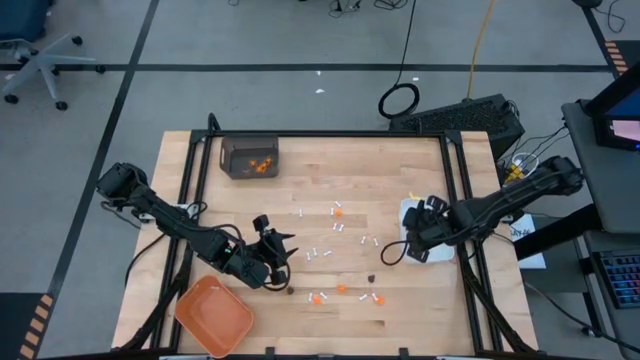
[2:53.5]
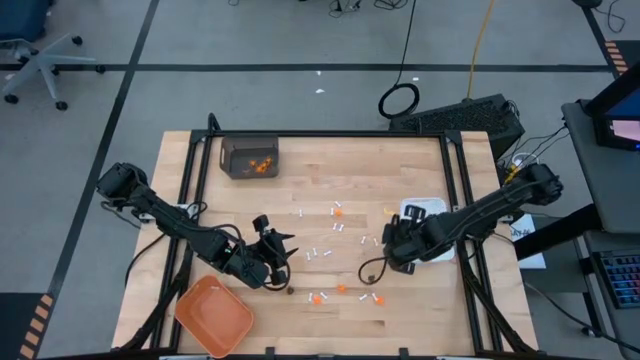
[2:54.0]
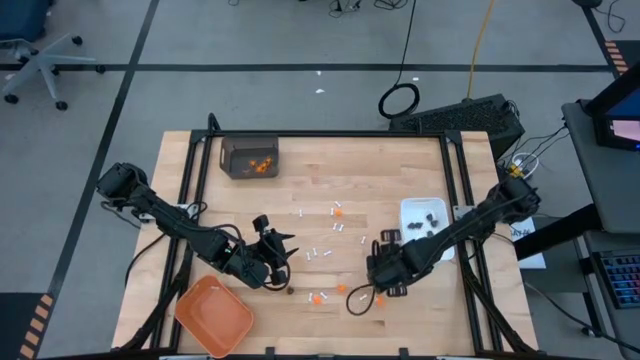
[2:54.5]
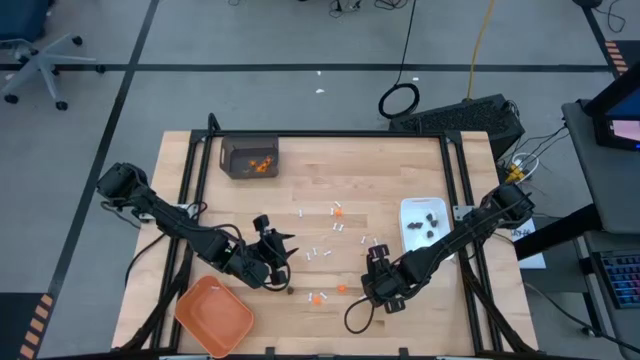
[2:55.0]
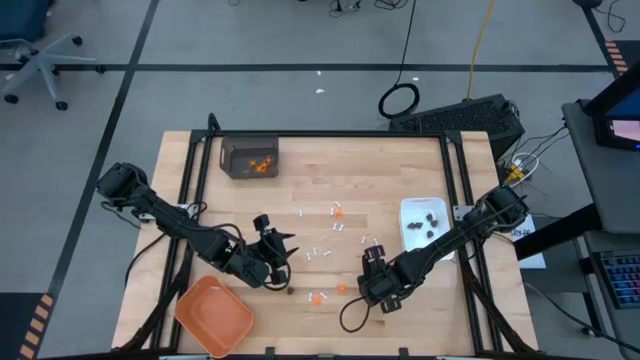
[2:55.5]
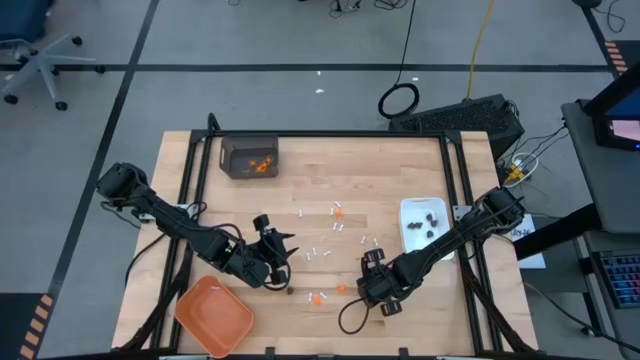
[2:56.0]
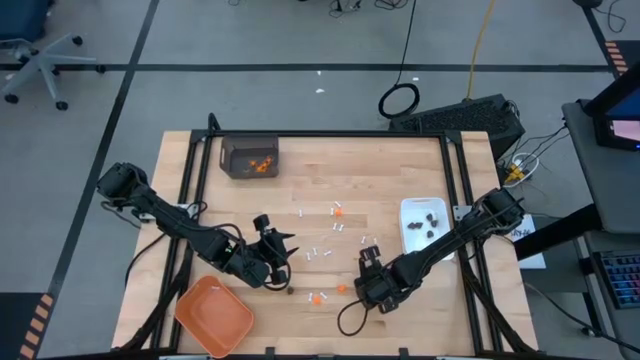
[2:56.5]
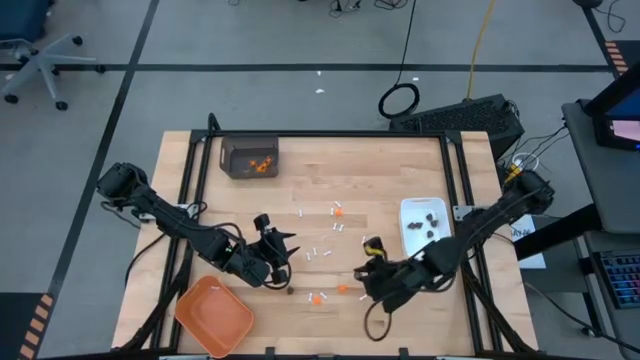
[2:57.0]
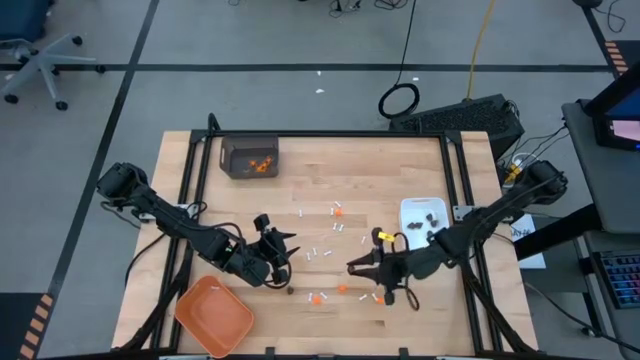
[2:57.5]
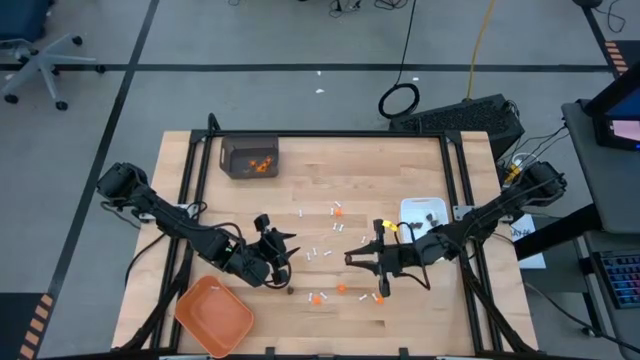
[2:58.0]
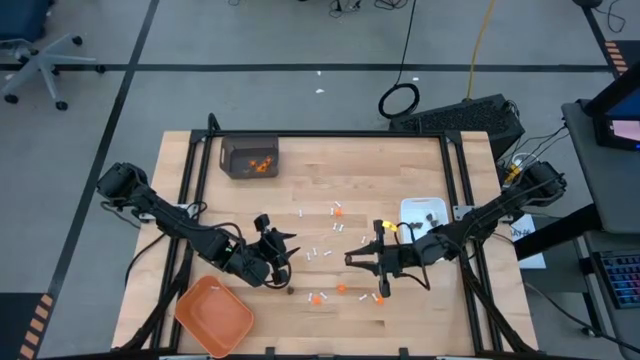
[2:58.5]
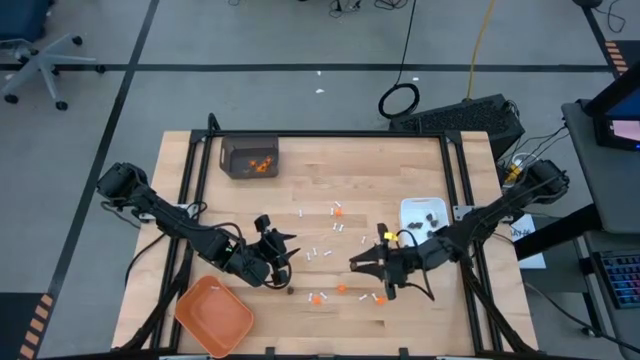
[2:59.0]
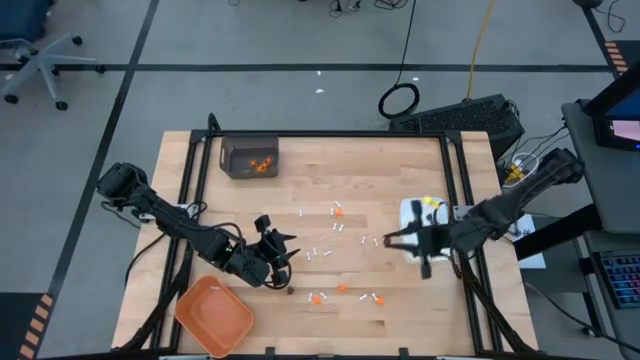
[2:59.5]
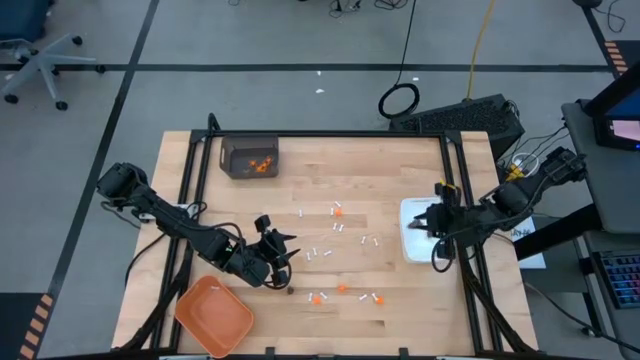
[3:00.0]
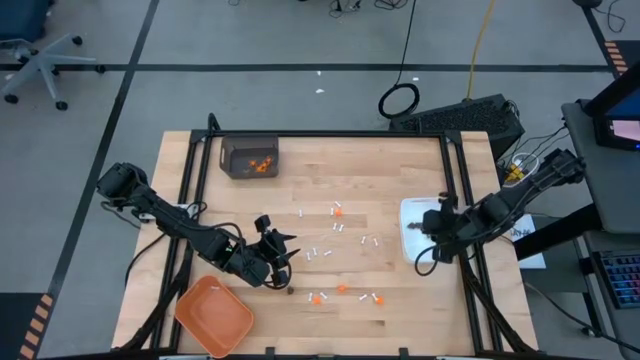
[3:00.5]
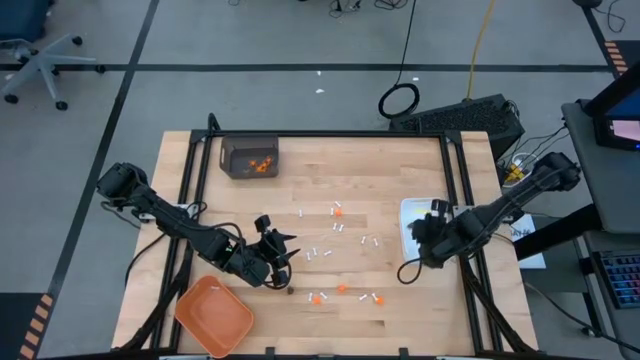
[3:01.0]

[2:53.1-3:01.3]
Task: Sort Halloween decoration
Put the black skull toy into the white bin

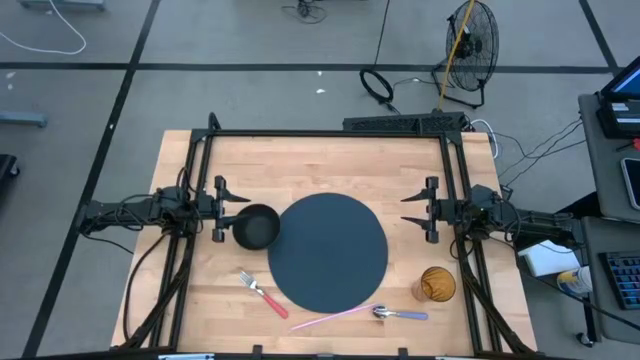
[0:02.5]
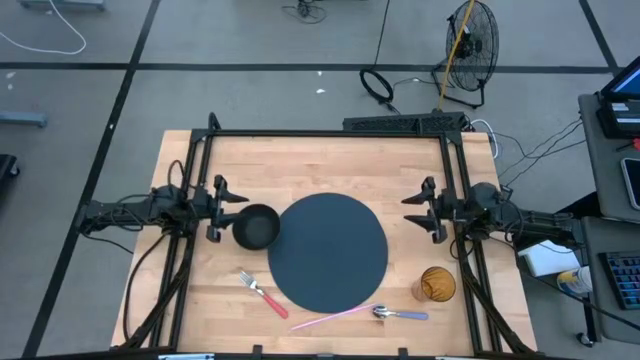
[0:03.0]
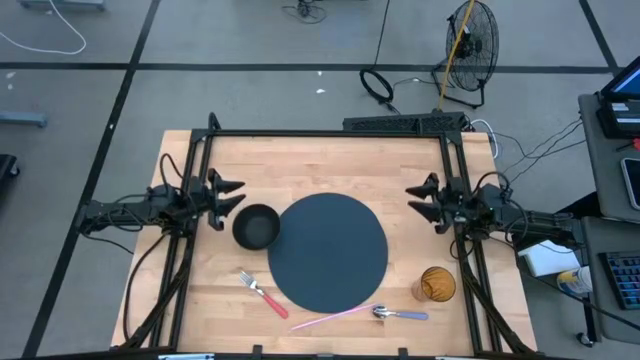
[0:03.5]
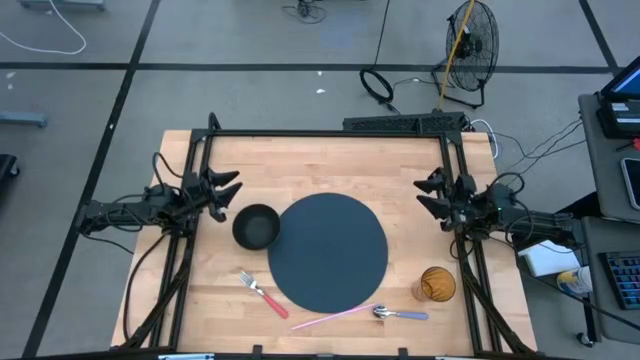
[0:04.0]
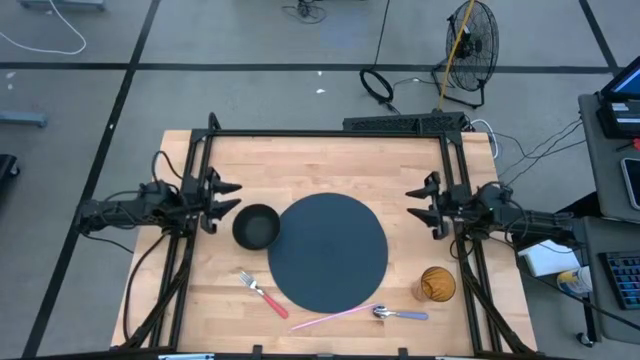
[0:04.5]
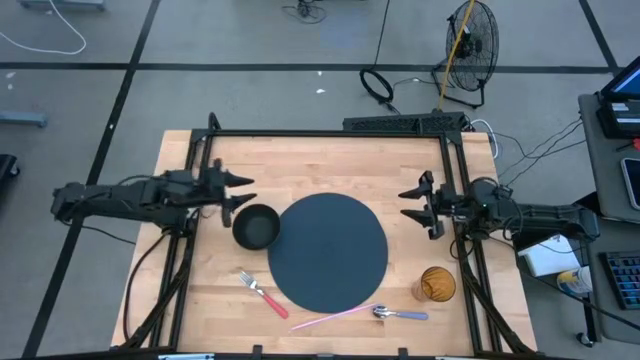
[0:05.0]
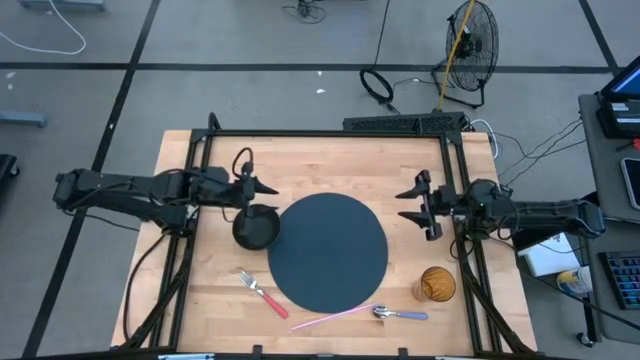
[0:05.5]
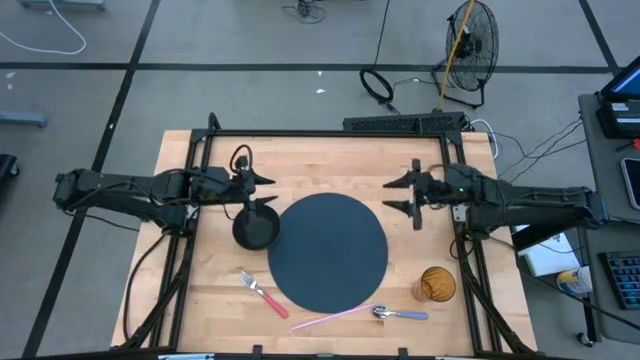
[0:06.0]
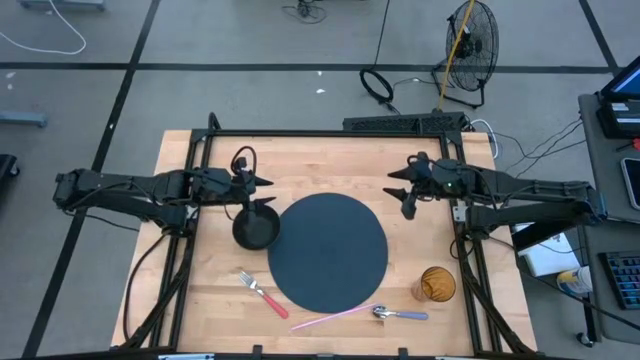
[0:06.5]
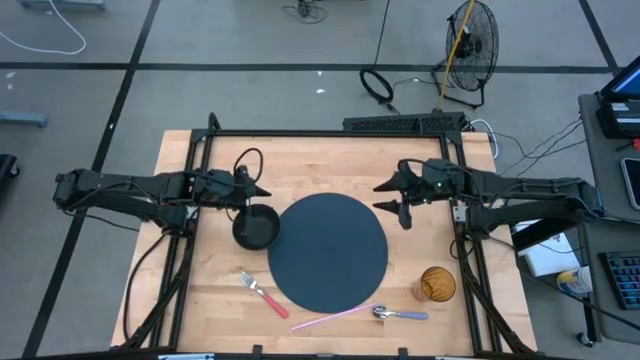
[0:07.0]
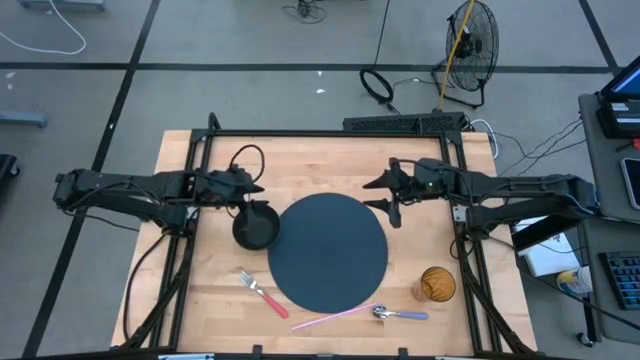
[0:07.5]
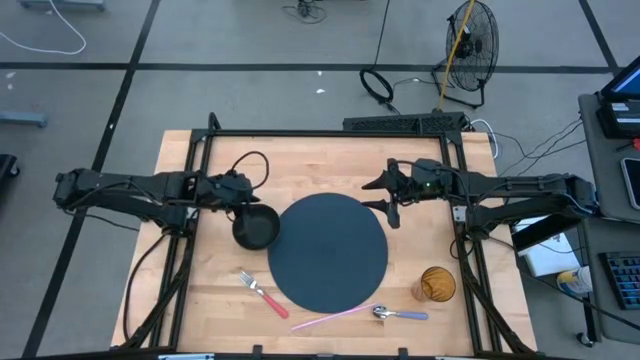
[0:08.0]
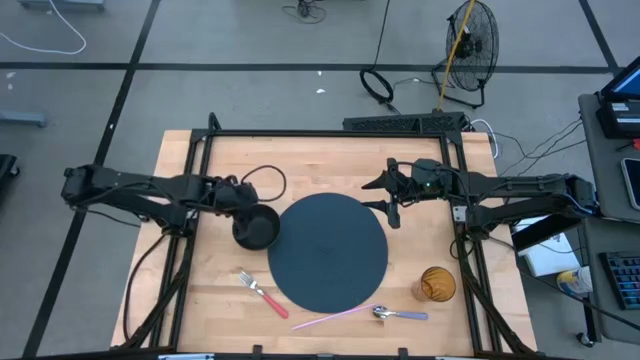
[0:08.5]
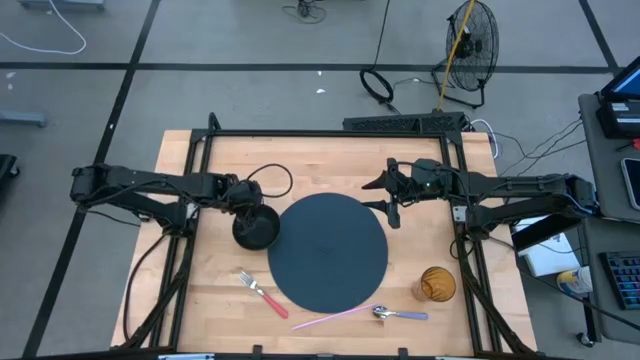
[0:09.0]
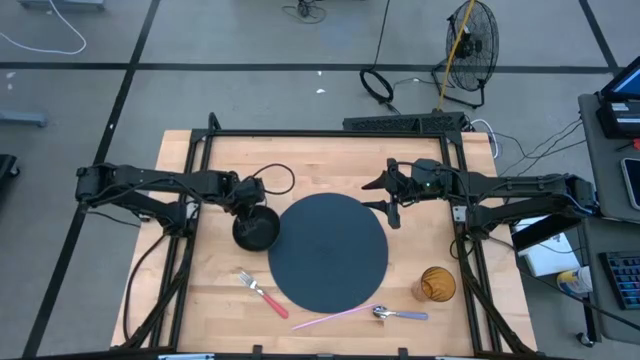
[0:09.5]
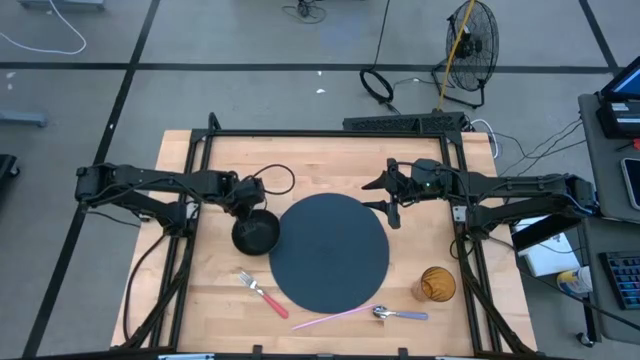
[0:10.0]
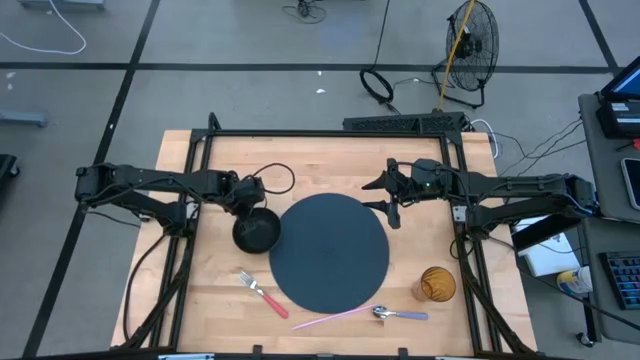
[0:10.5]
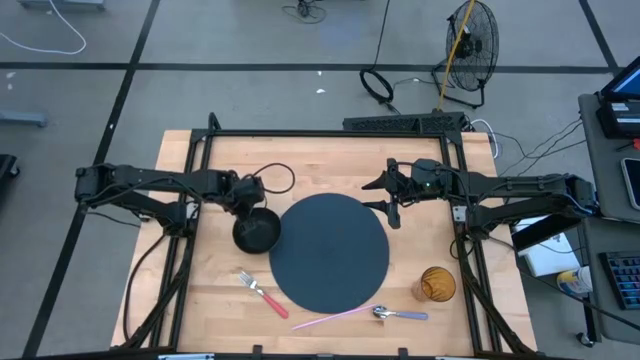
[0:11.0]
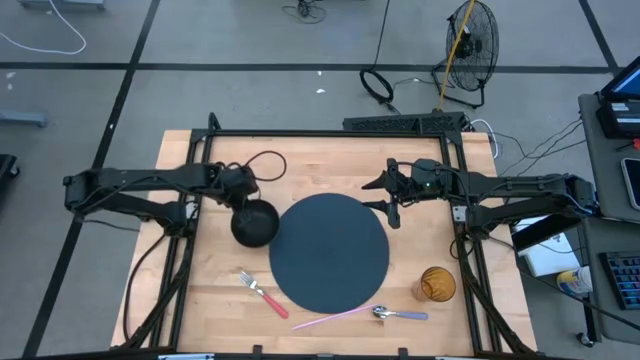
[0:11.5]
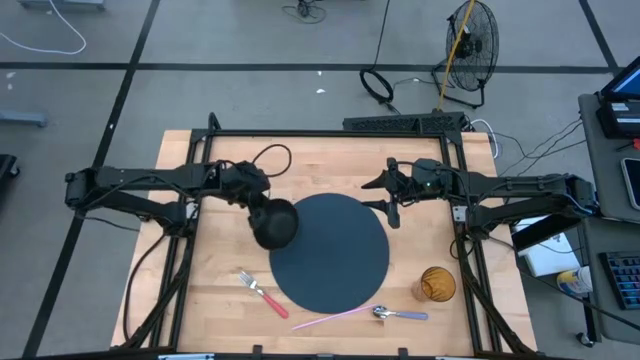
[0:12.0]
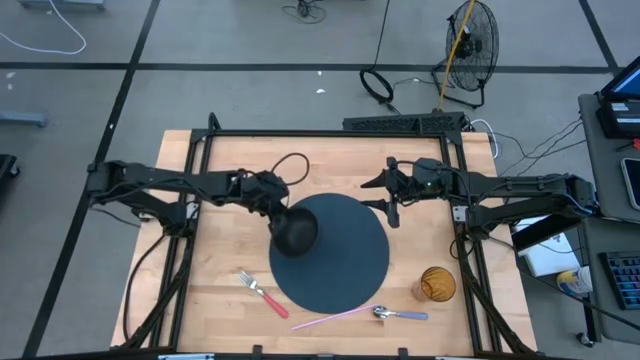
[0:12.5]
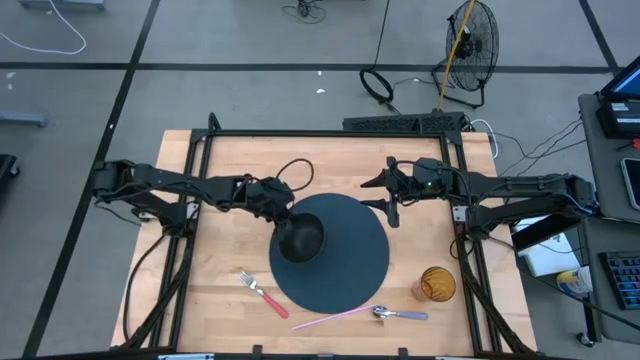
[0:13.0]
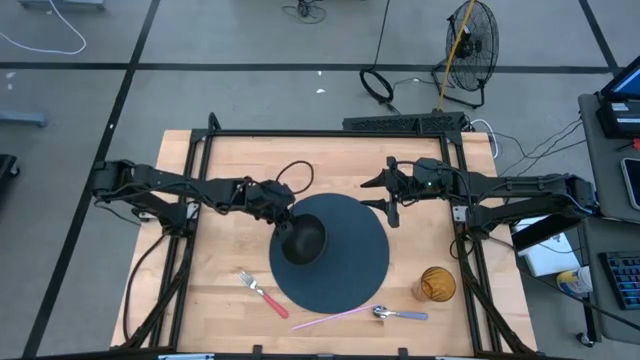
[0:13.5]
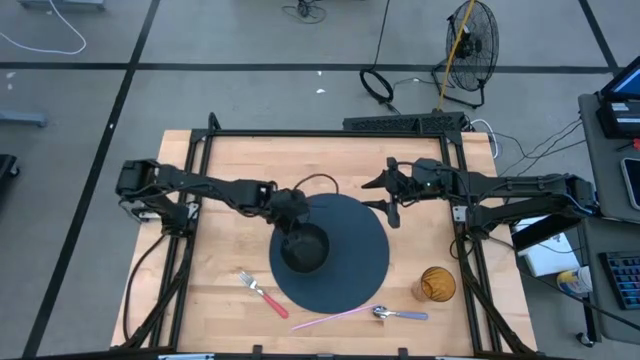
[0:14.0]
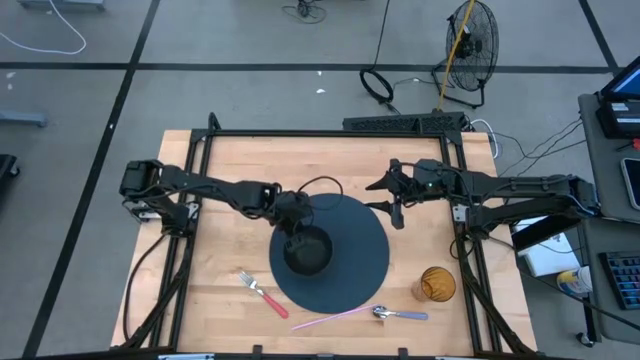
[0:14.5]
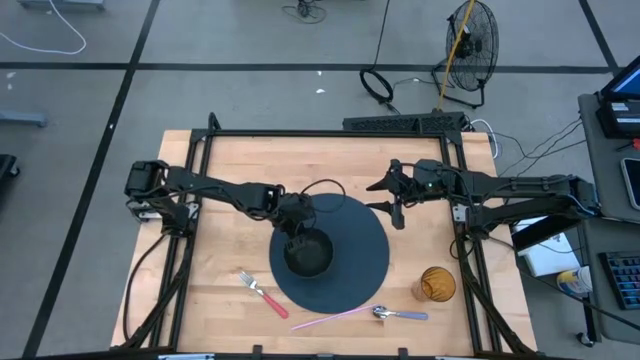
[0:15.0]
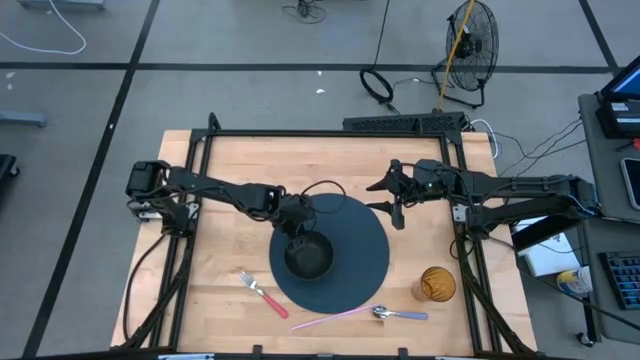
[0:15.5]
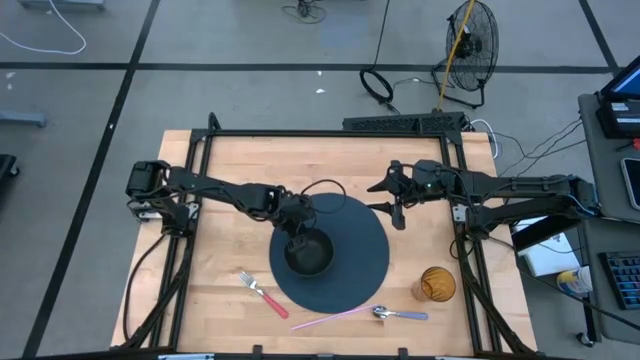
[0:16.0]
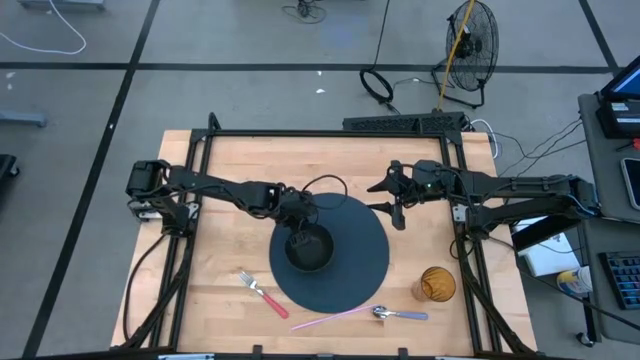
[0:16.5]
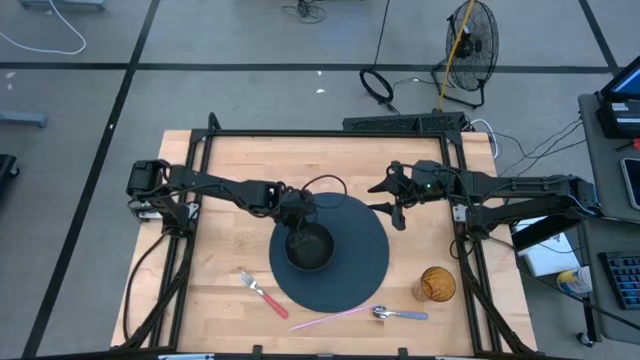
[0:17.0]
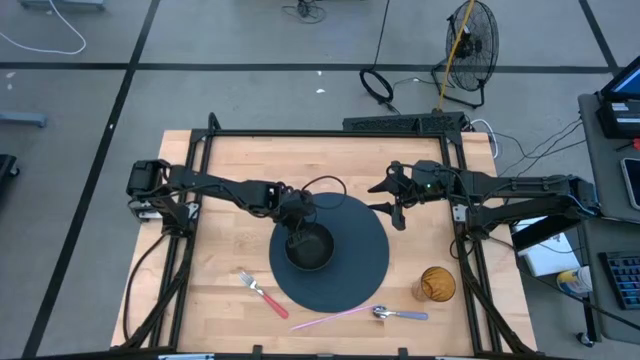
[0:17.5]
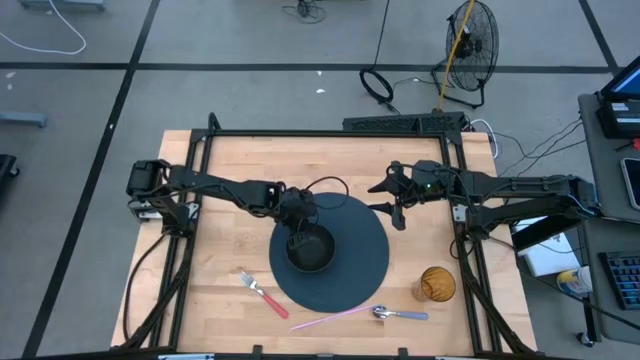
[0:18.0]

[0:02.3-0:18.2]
Task: Pick & Place Utensil
Put the black bowl on the middle left of the blue mat
